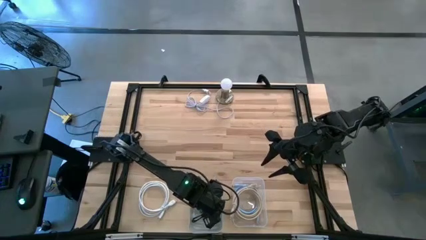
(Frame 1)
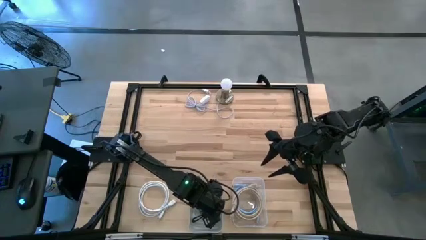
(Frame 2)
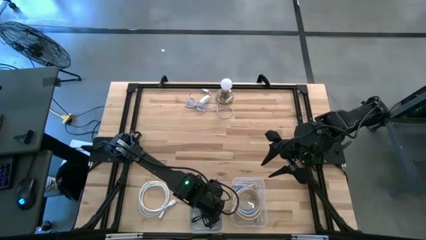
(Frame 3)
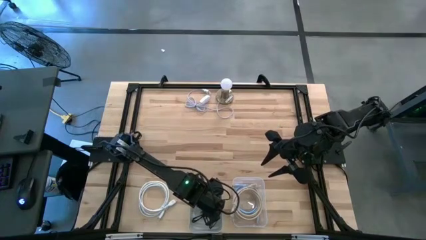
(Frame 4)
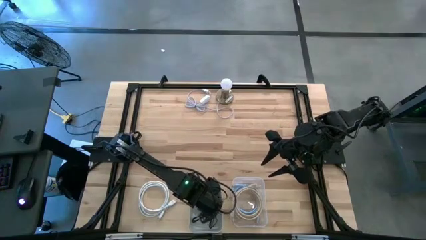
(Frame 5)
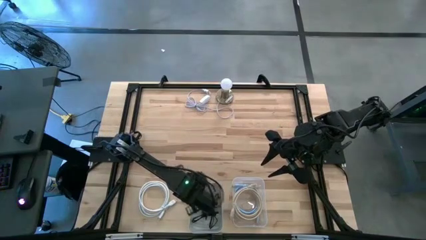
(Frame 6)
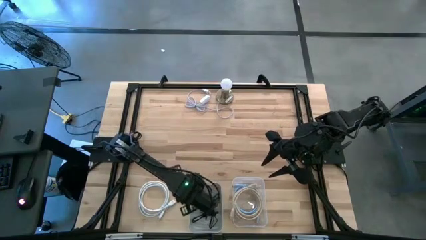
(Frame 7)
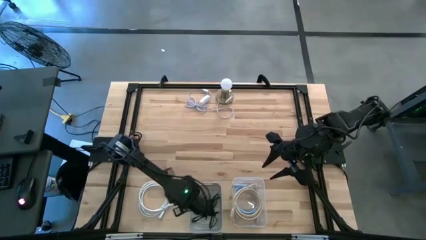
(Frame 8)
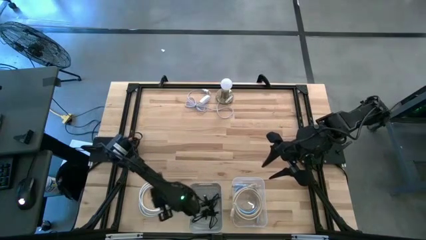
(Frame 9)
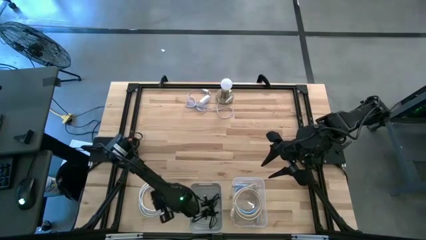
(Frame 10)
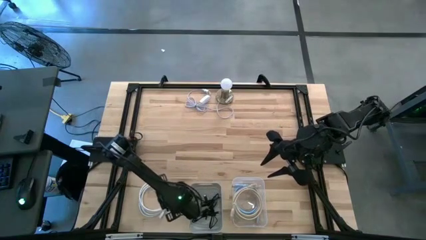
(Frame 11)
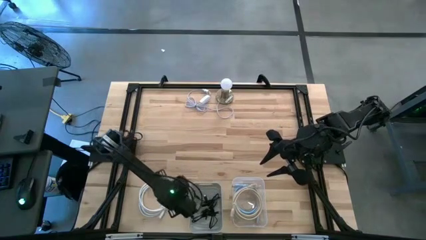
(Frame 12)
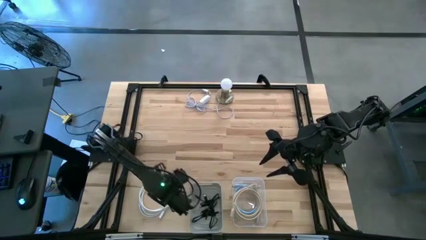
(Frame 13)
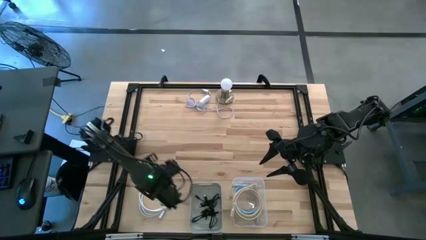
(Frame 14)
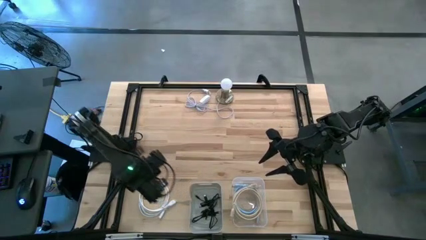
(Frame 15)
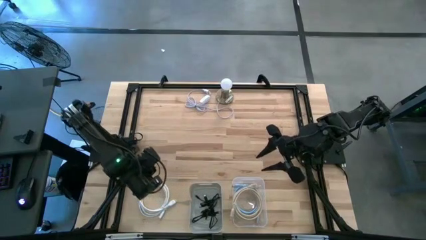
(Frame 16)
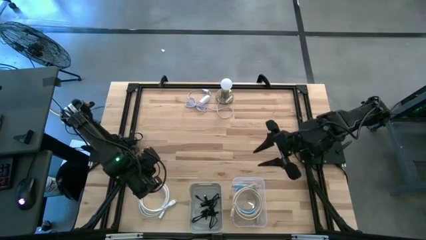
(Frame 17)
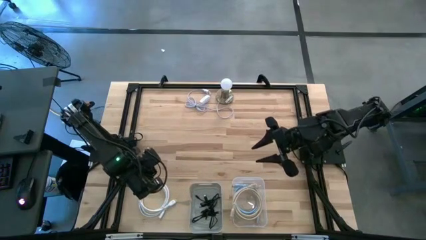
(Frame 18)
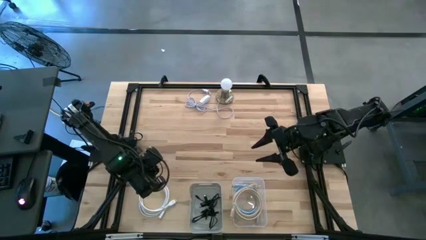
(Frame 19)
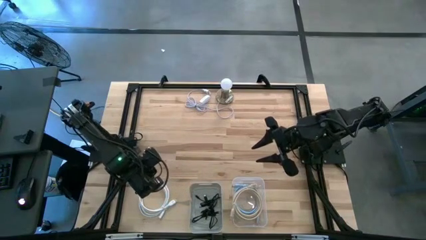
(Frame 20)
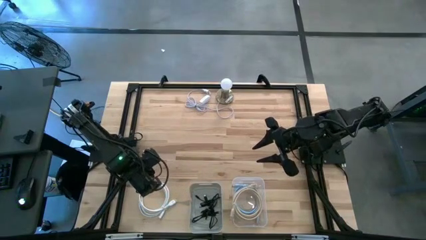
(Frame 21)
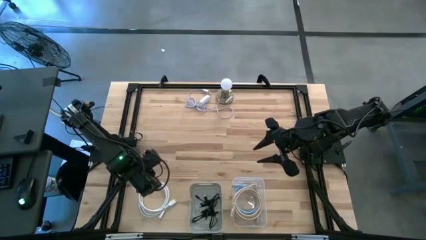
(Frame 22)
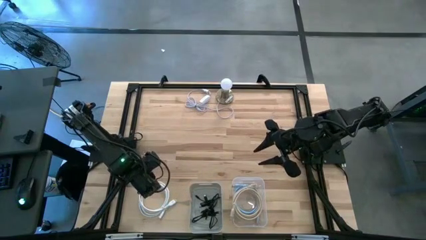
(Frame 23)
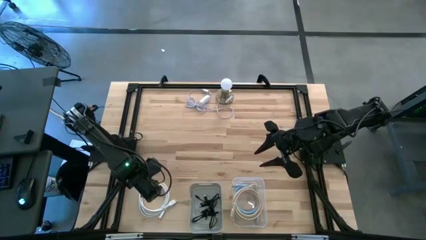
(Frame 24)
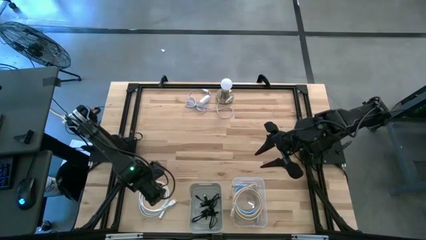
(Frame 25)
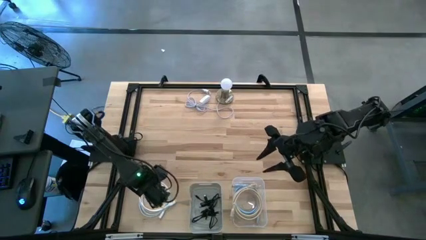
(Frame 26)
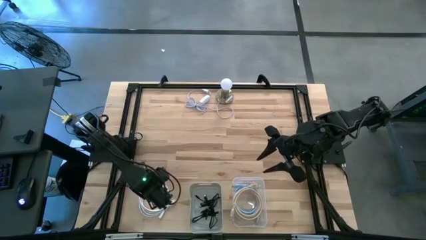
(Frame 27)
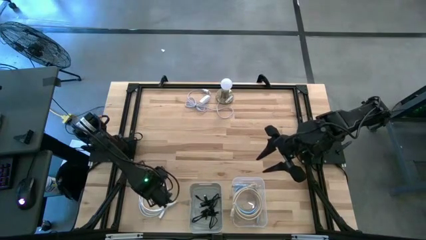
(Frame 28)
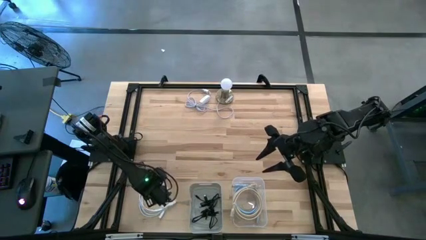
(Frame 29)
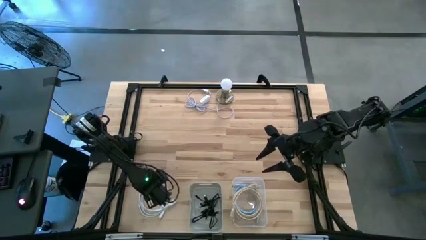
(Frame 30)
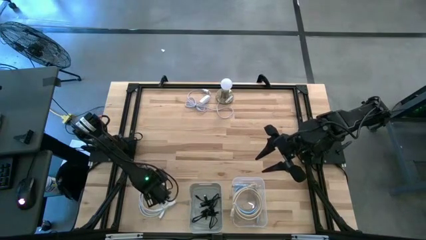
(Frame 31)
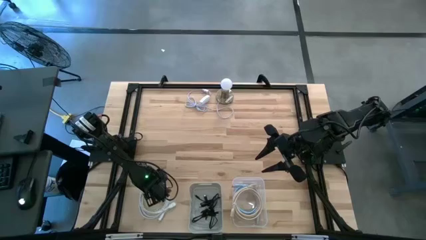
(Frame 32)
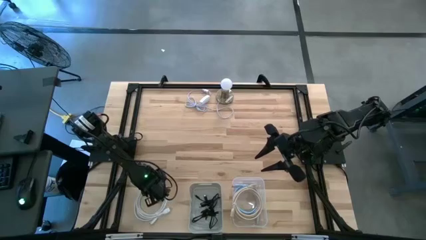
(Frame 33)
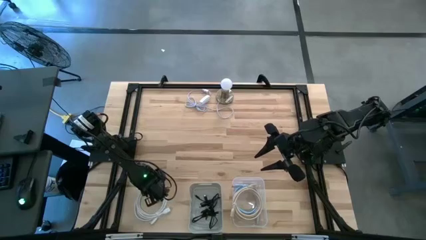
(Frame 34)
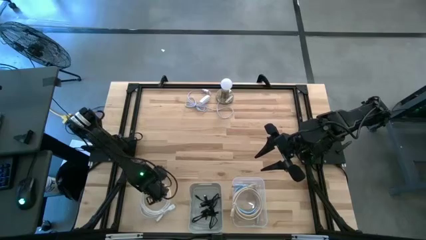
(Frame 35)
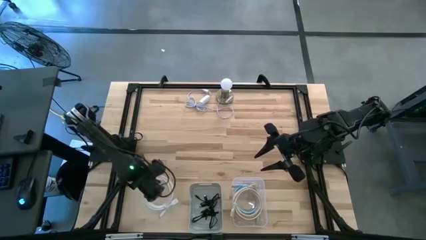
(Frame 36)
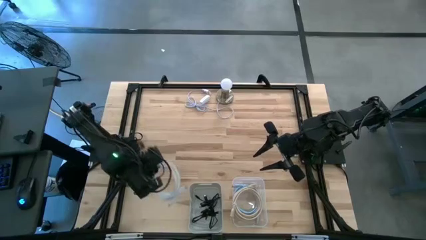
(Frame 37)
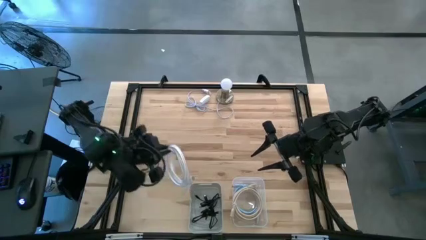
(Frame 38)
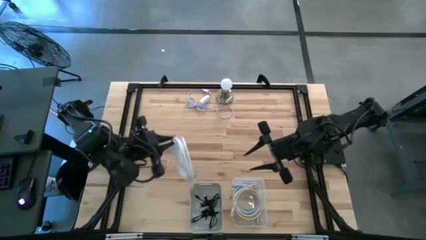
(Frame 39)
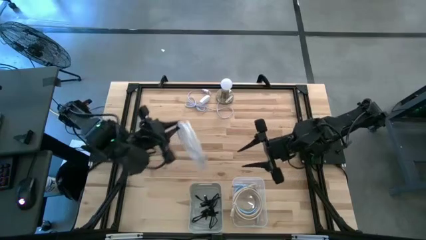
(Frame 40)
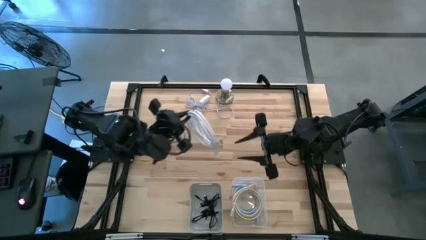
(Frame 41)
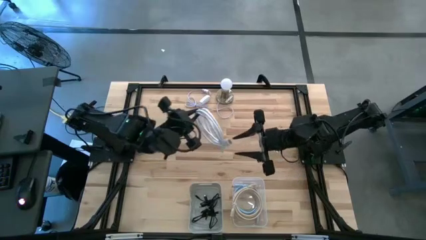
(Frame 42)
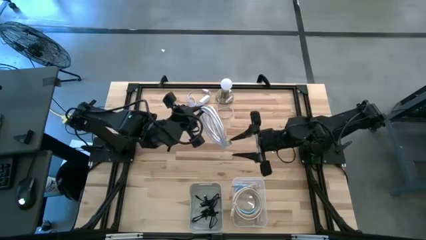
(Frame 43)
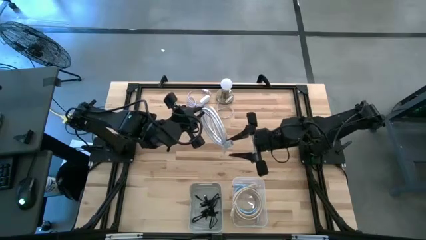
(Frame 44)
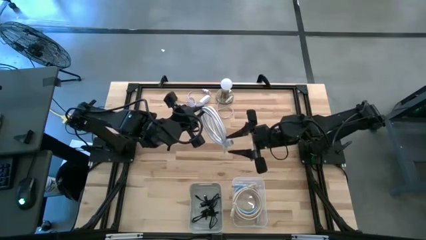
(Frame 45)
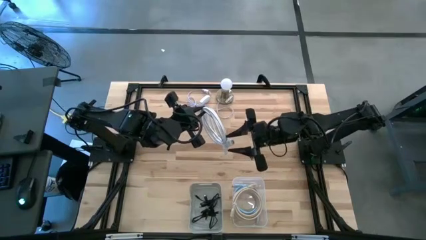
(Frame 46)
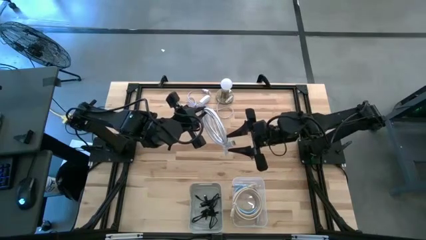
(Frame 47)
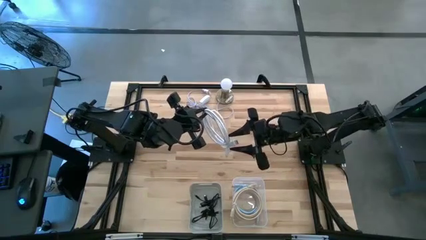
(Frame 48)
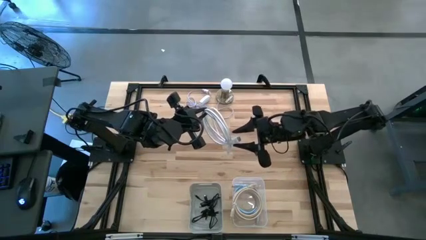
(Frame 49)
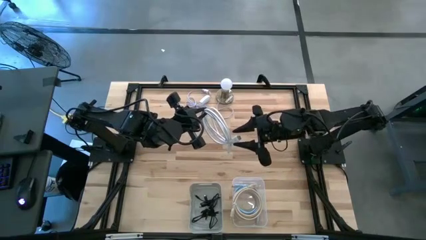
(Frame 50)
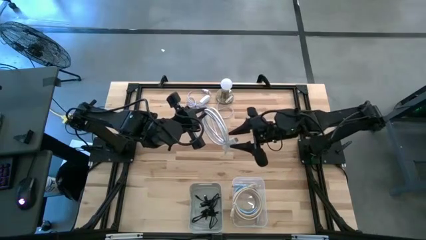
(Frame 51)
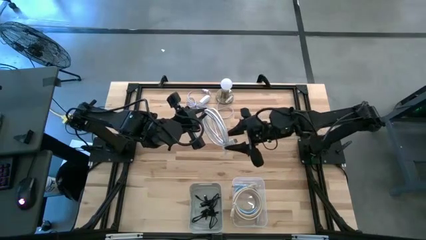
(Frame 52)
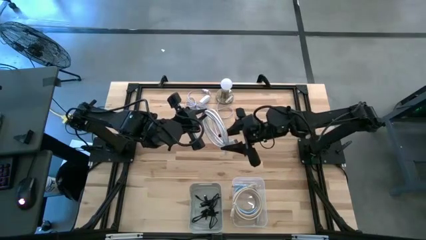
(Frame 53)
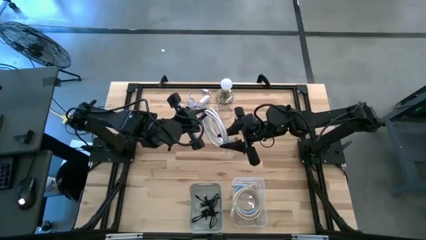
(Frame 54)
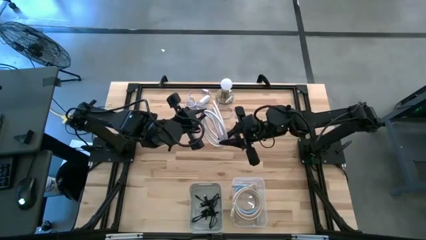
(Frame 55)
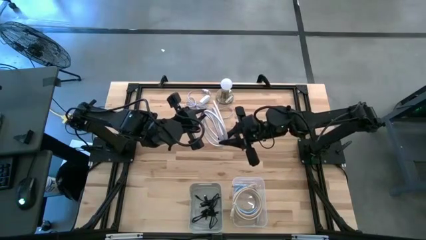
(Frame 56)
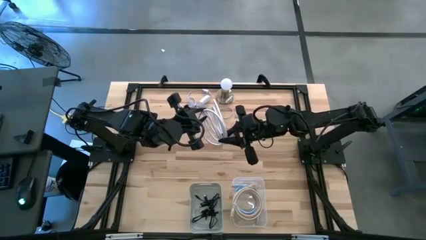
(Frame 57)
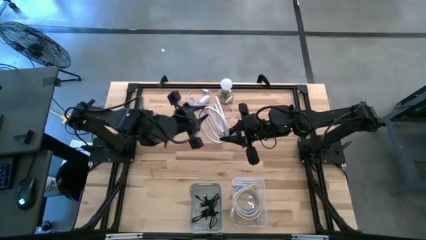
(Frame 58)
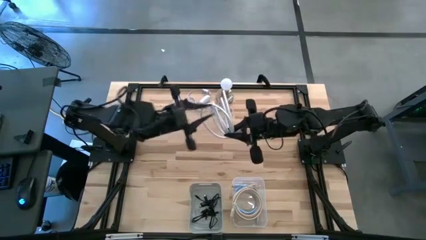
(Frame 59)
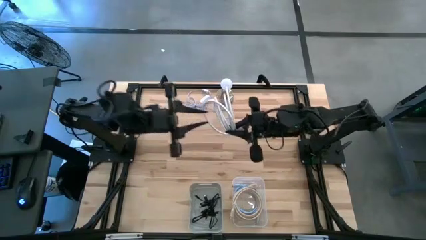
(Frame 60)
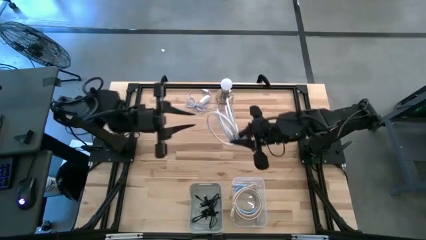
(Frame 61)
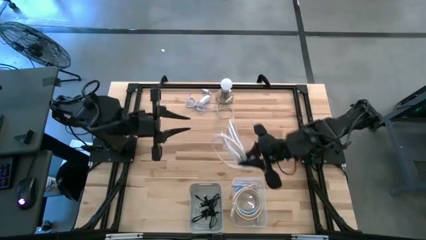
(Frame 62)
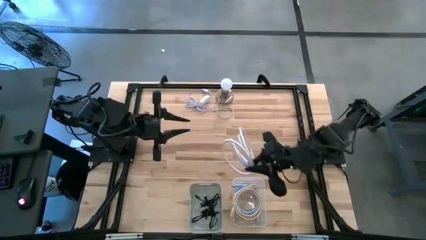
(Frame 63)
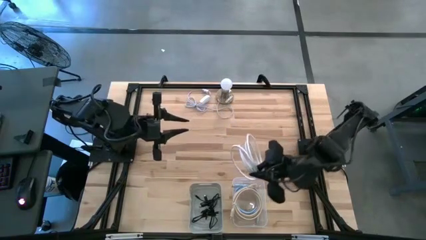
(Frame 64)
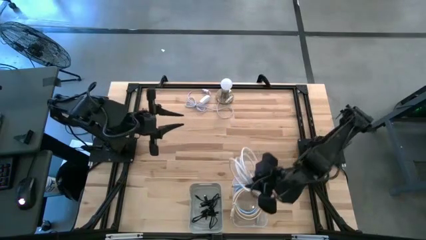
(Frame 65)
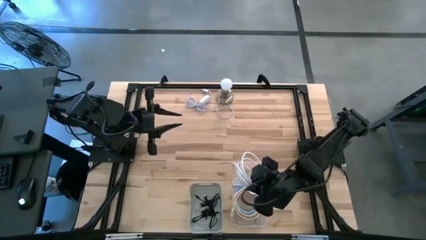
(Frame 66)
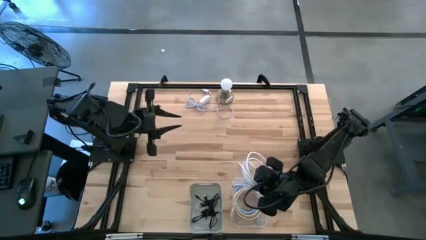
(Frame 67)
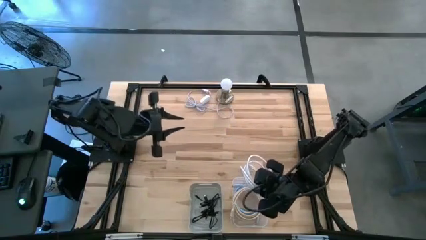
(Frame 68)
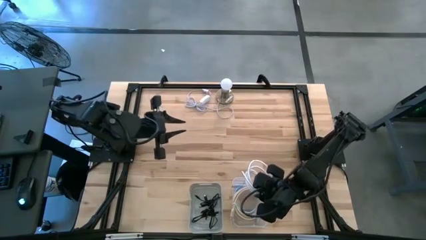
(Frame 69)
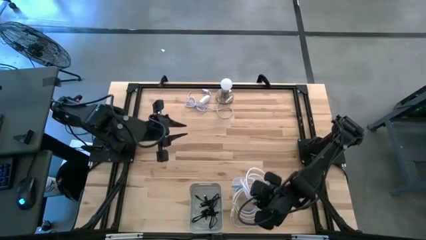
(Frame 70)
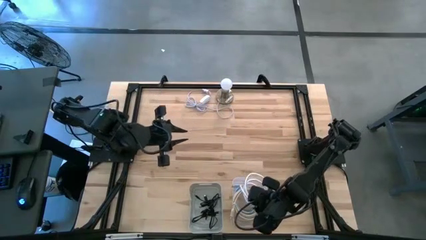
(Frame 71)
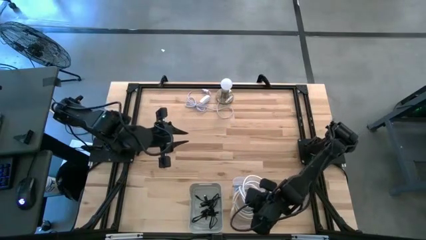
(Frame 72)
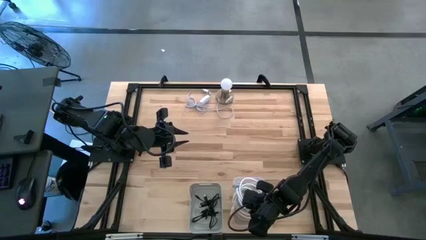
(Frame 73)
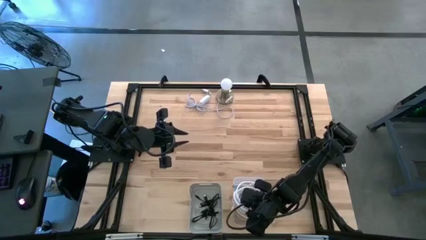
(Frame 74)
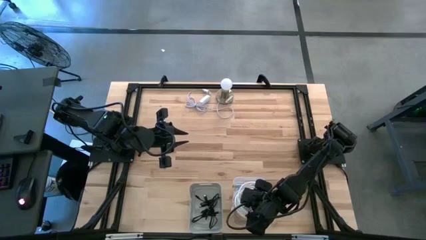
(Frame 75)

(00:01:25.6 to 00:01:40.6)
Task: Pick & Place USB Port
Put the white HDMI cable into the transparent bin

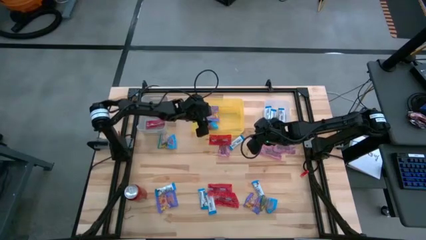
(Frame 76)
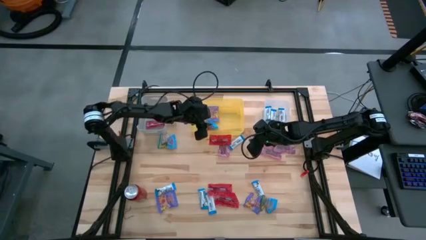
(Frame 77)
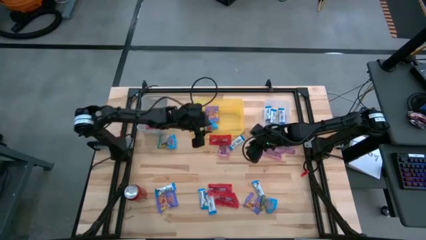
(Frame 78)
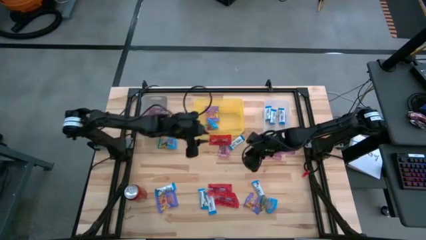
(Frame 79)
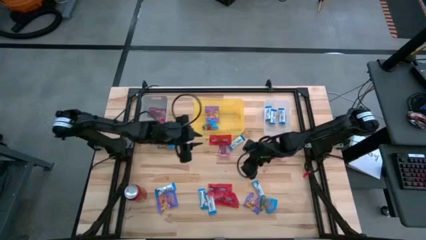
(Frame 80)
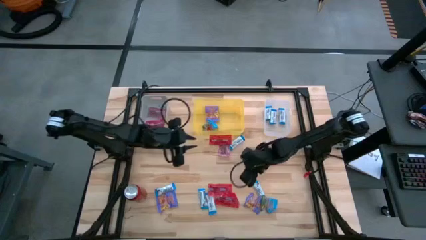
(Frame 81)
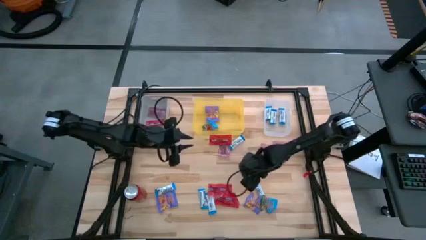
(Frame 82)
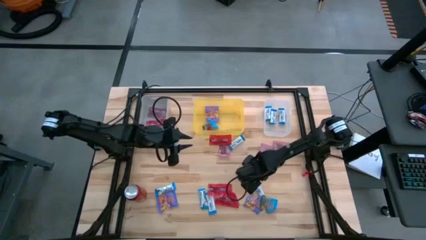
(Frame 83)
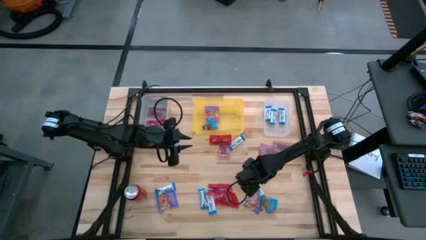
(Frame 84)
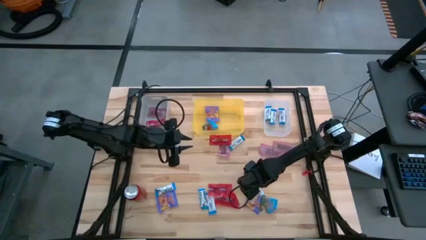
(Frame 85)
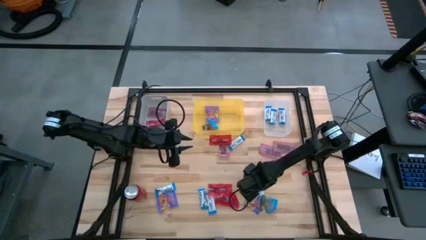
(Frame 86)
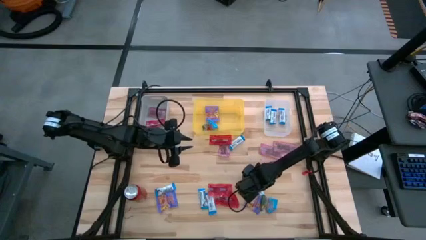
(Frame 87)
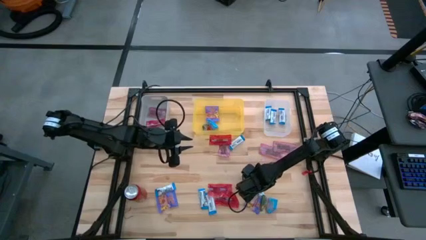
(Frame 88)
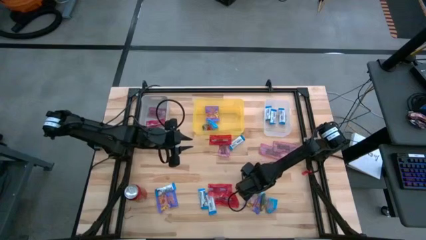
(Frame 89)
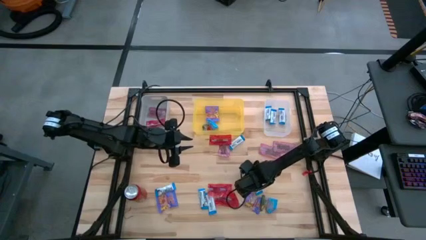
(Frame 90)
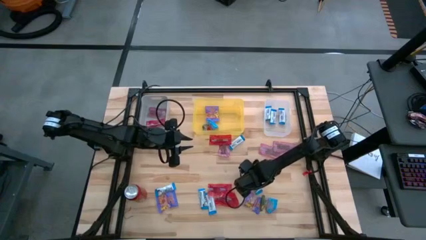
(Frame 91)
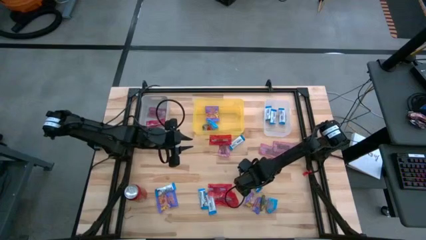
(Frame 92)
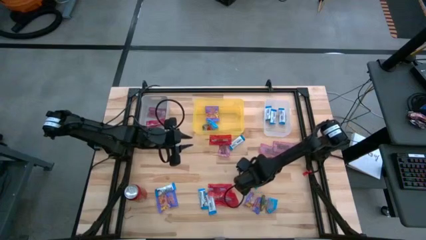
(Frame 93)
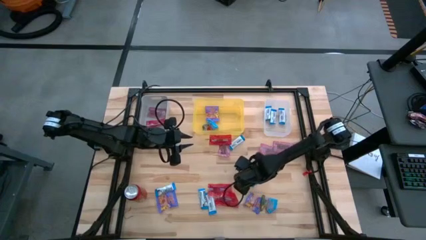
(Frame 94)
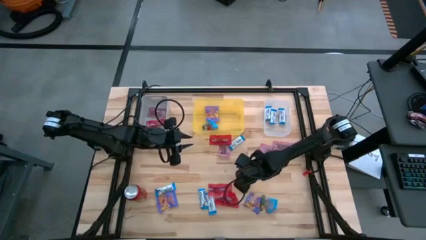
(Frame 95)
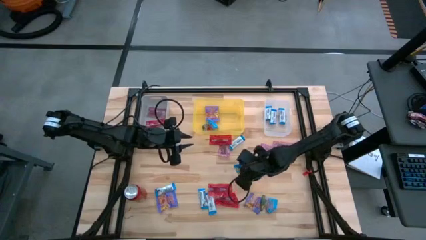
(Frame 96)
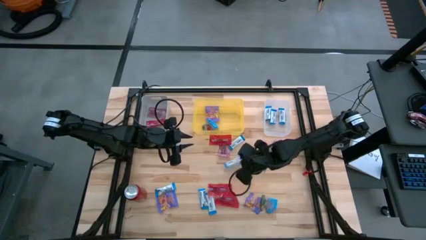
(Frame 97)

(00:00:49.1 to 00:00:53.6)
Task: Sort candy
Put the white chocolate into the transparent bin
